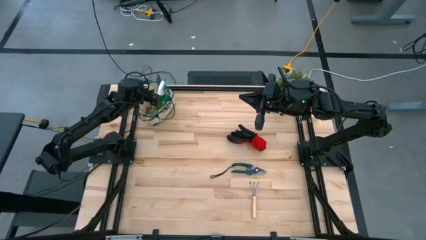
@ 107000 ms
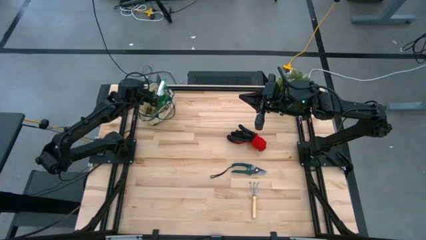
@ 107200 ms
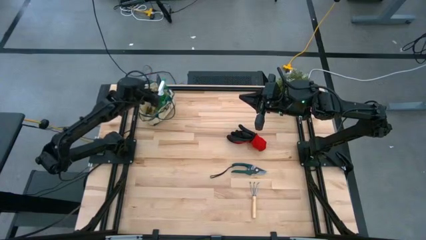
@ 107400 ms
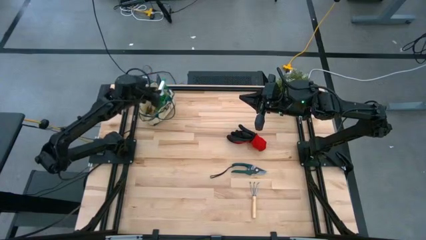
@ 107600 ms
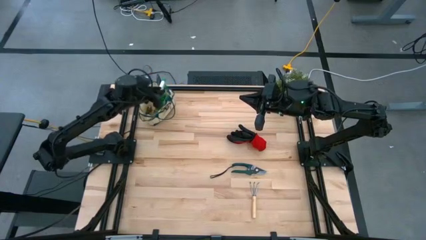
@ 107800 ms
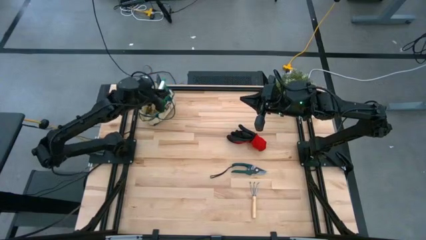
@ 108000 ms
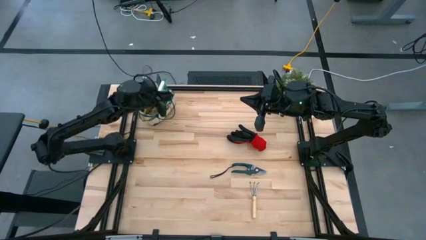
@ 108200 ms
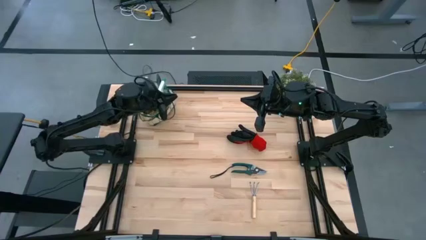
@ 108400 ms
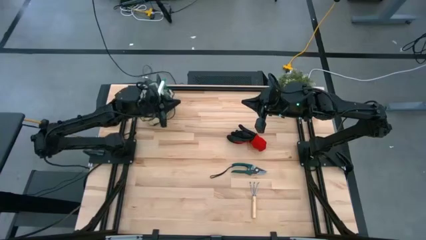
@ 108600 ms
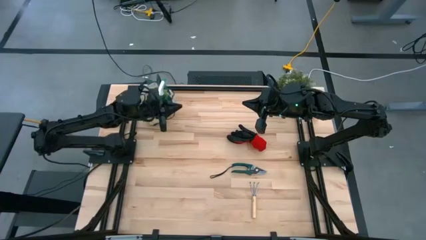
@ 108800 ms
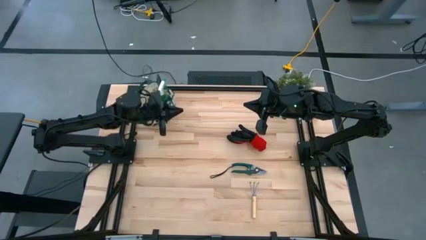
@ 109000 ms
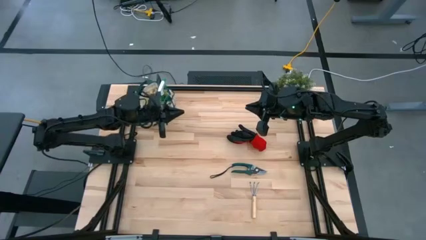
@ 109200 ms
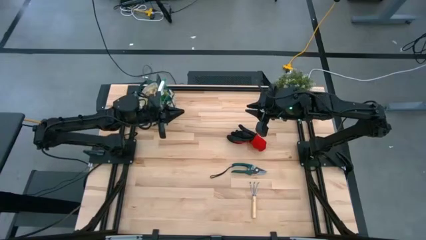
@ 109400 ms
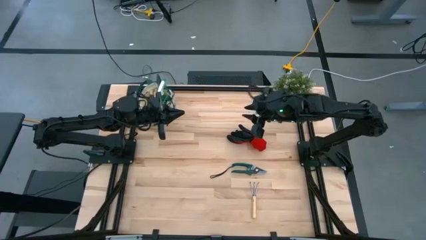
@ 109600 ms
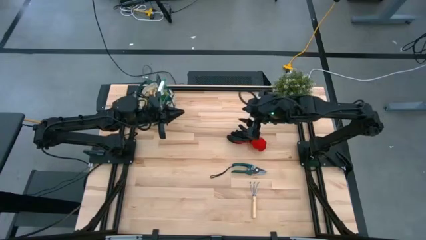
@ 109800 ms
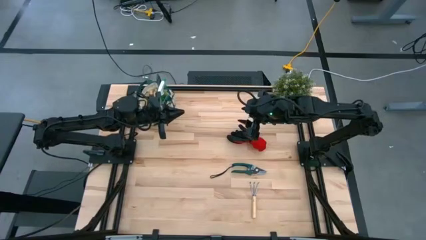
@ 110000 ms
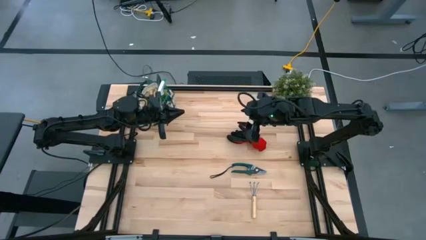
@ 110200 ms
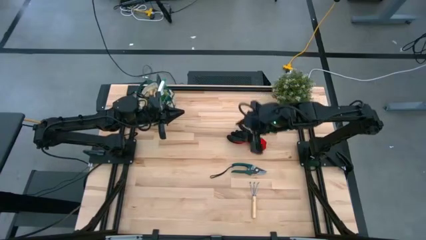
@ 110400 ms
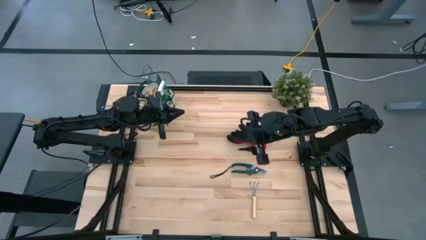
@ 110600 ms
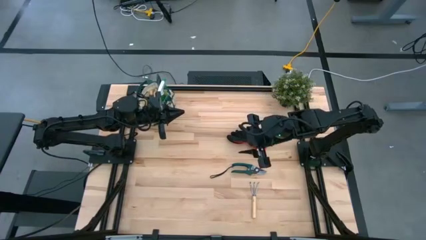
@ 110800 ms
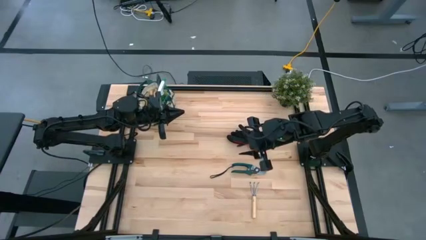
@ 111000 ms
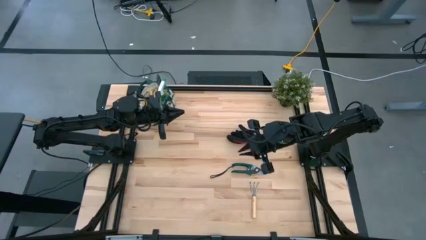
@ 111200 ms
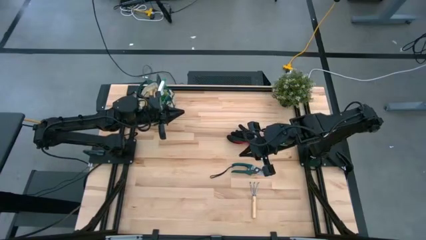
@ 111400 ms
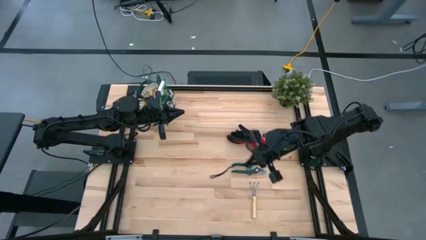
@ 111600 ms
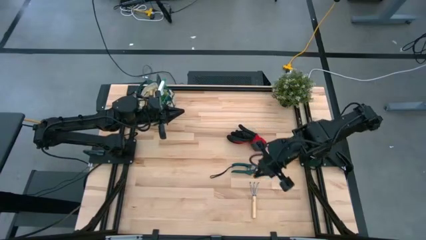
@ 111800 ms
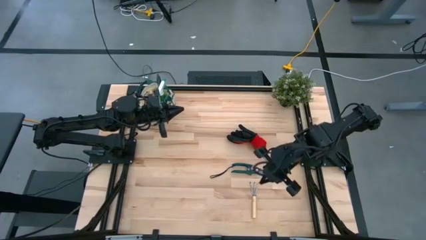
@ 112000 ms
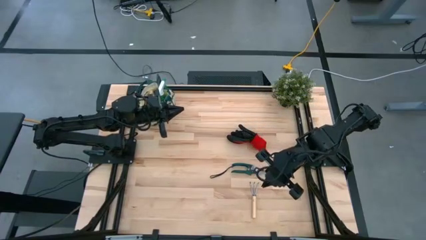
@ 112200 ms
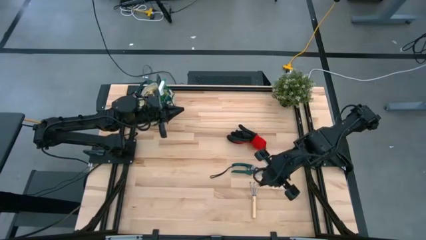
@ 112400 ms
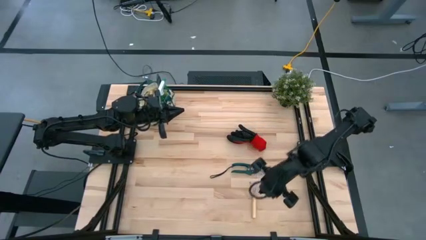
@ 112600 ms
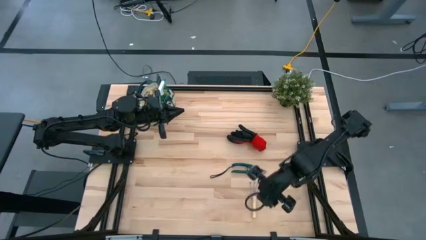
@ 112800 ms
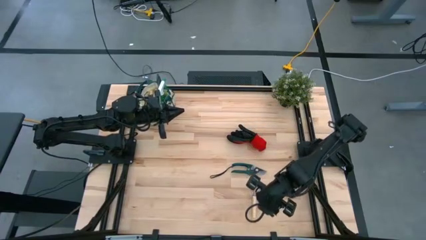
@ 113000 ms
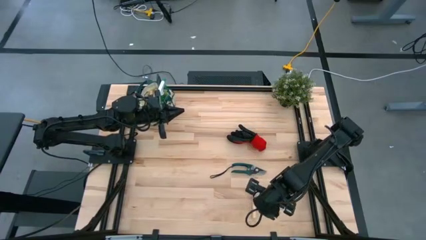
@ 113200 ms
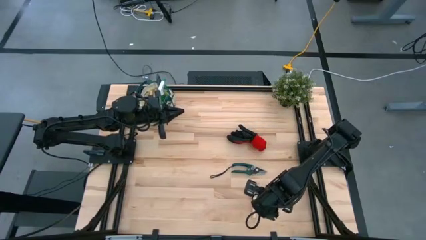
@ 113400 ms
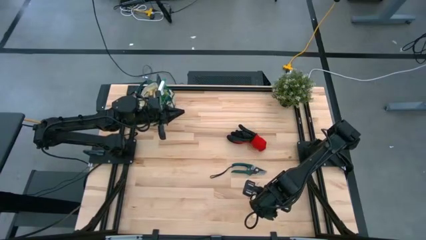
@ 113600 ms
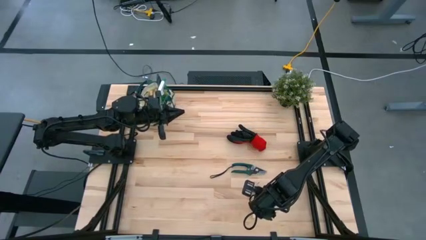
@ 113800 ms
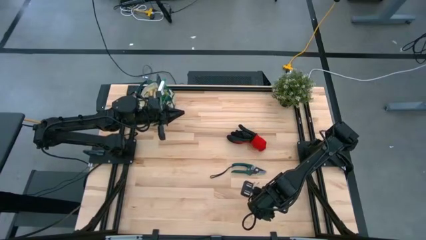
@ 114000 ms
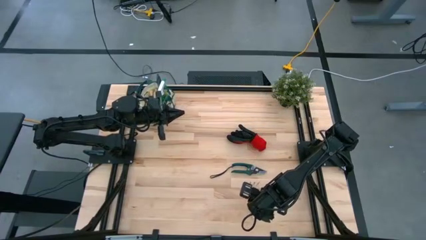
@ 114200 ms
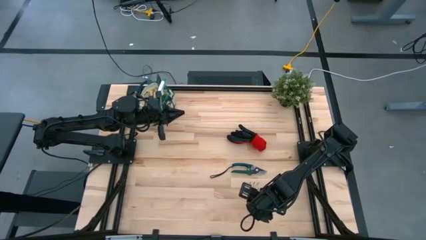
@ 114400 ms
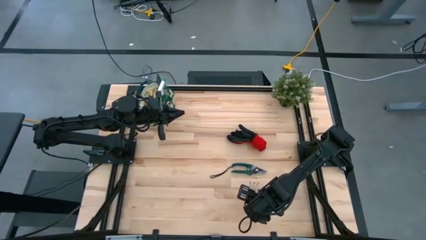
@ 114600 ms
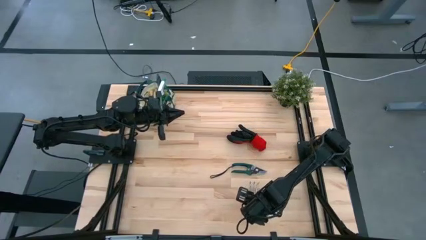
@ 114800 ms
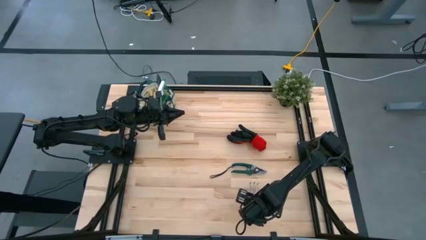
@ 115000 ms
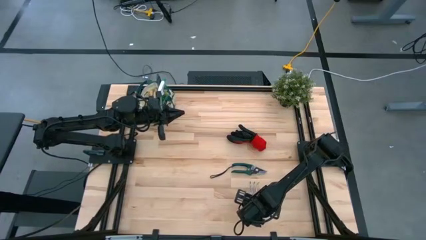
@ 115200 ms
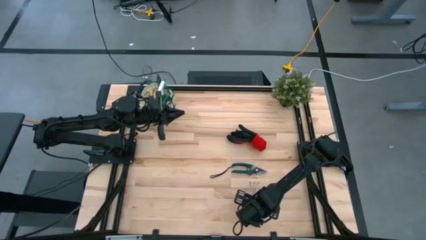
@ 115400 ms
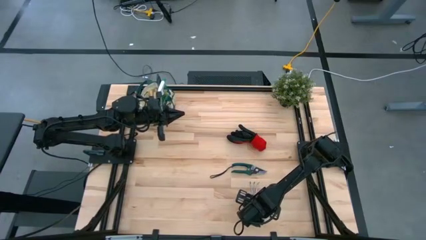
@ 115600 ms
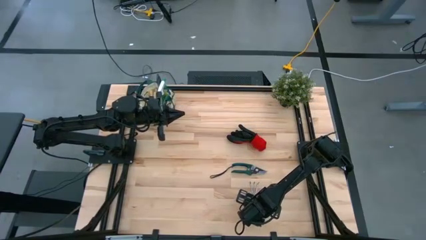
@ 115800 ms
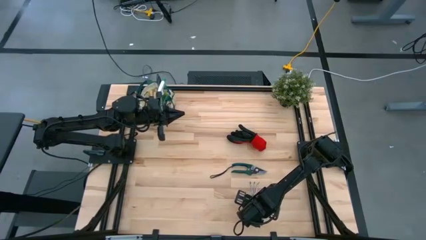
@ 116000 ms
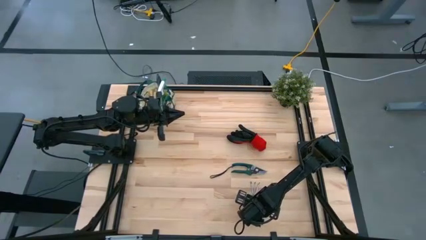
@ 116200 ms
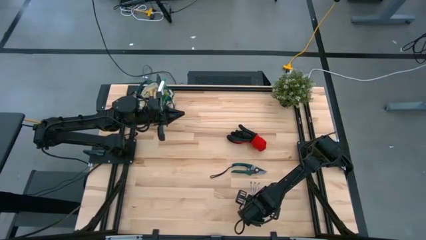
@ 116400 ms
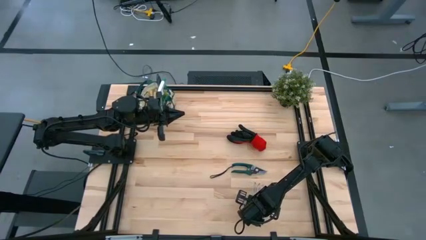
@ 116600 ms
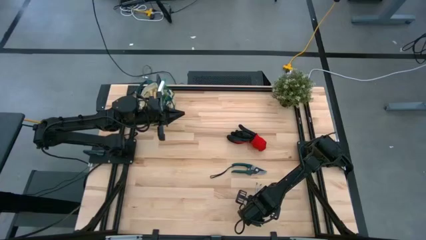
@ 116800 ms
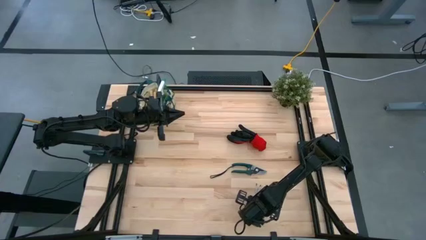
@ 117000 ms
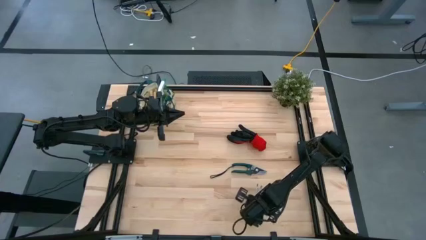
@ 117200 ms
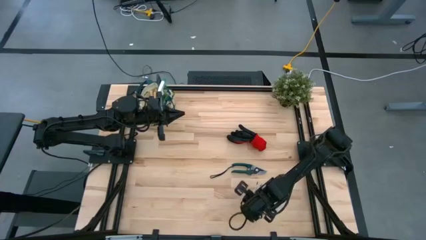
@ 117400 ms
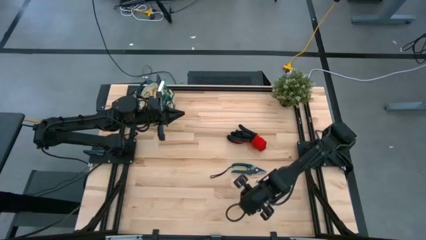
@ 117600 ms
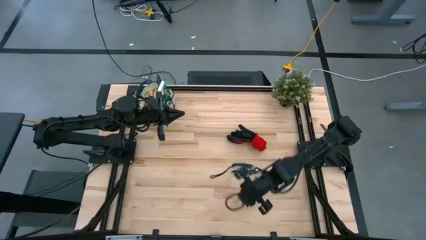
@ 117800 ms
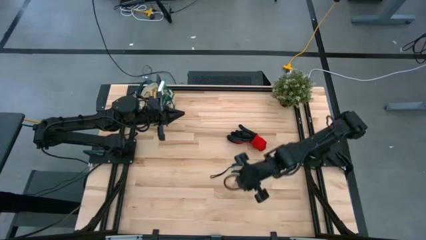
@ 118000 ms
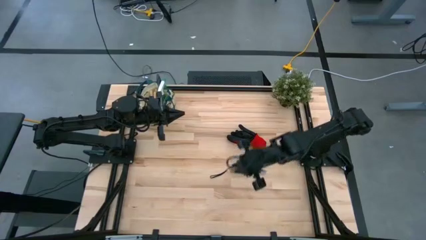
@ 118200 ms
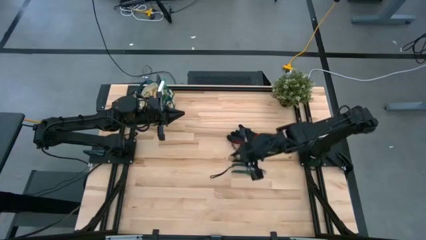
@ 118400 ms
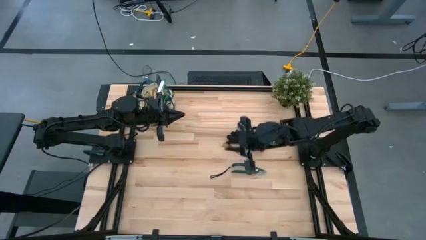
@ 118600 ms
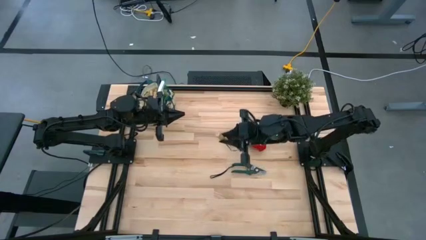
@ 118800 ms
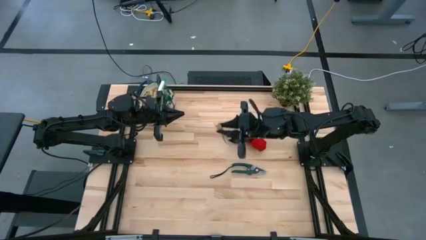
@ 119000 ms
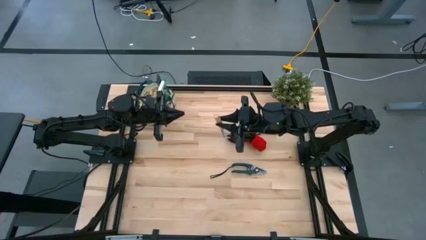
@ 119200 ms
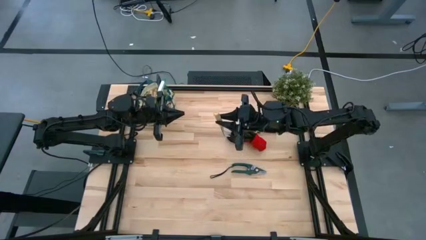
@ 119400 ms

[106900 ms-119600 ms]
Task: Pick & Place Garden tools in Gardening bag
Put the brown hand rake into the gardening bag

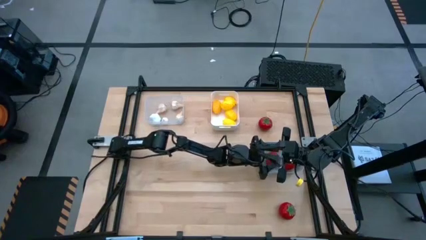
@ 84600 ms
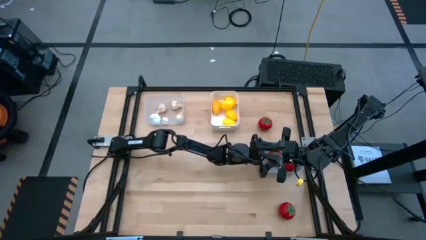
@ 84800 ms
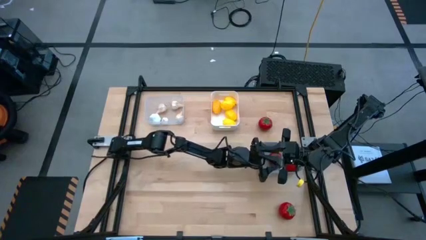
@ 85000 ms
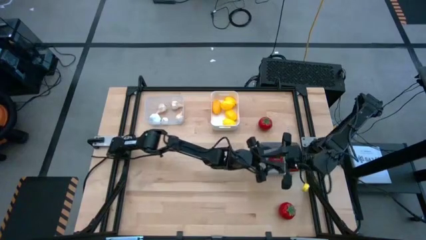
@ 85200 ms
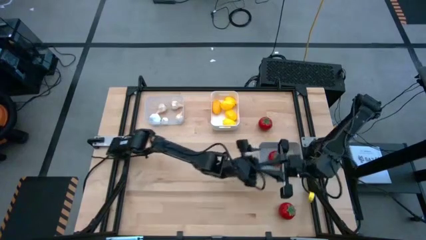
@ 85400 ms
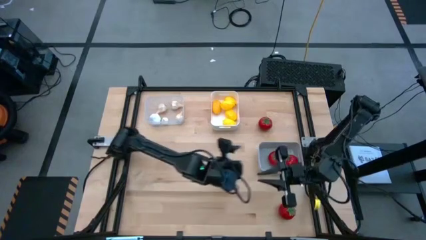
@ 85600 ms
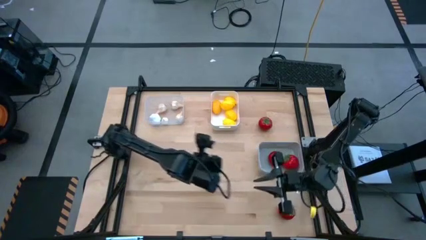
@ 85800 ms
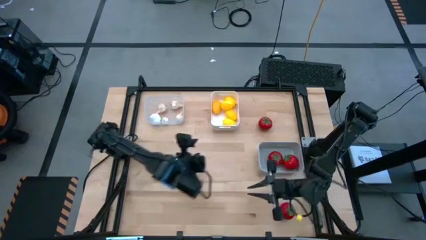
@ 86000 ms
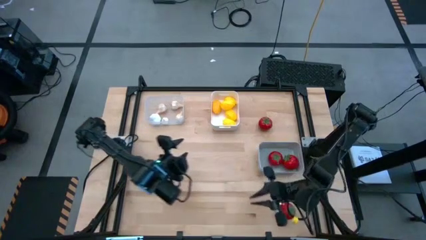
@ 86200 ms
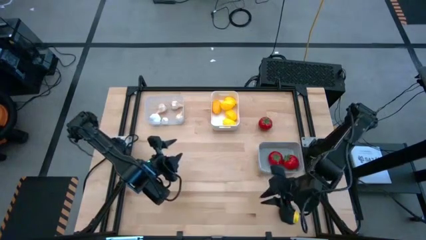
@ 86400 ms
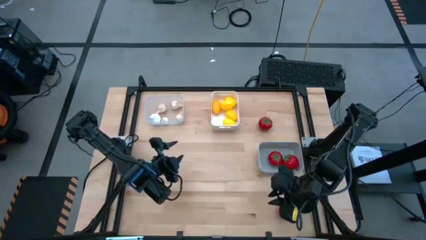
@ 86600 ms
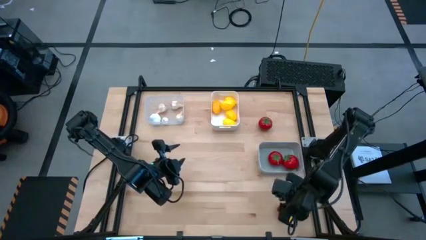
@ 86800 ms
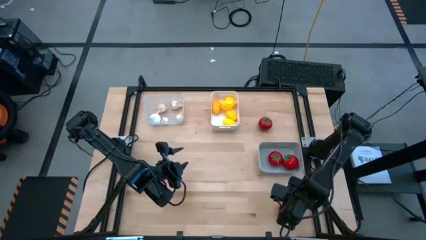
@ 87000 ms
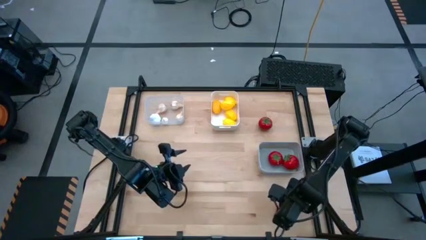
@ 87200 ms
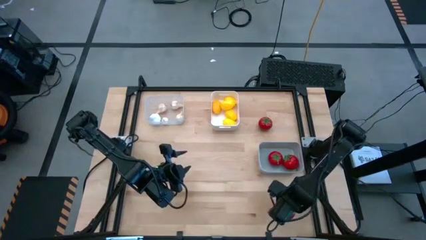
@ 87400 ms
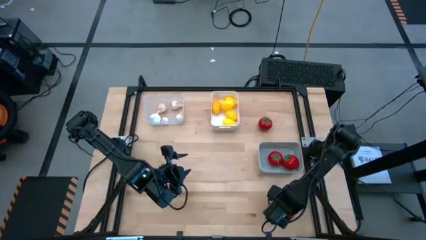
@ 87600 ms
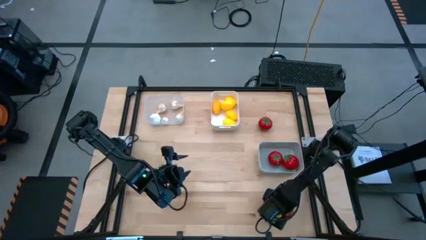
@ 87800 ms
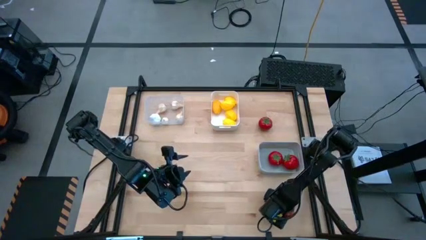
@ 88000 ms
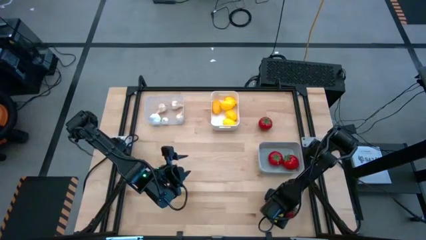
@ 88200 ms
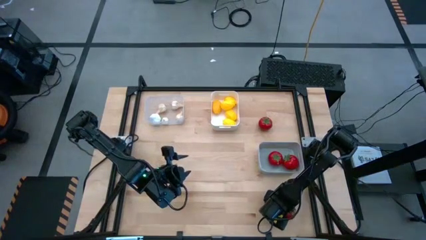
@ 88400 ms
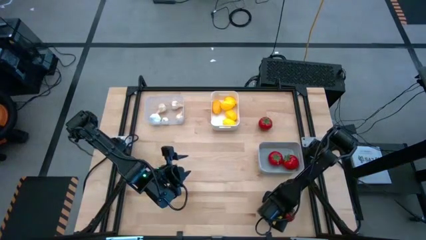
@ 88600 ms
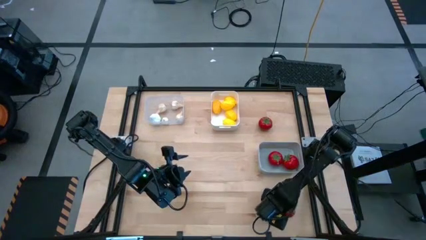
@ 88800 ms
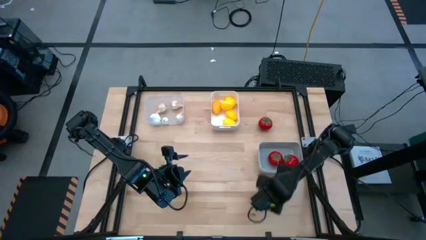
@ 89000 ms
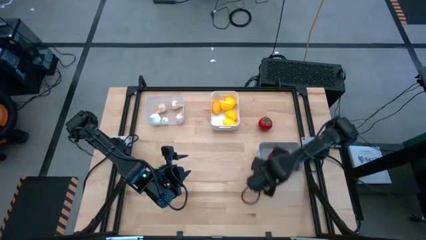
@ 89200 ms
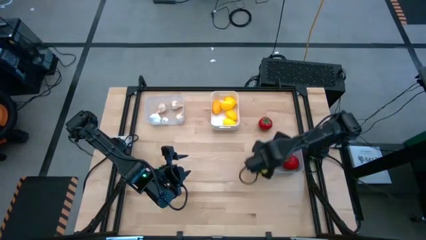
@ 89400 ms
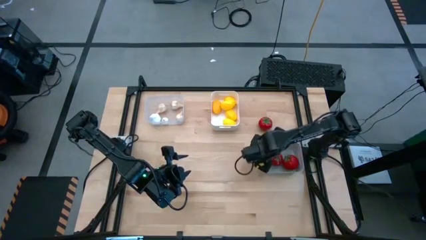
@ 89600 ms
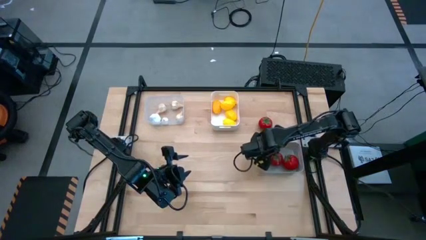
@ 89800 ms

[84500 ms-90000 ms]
Task: Sort produce into baskets
Put the tomato into the gray bin
